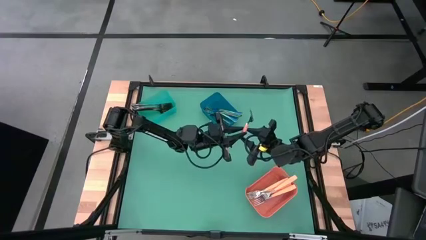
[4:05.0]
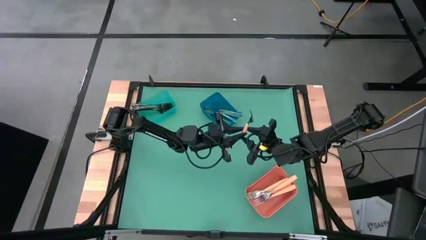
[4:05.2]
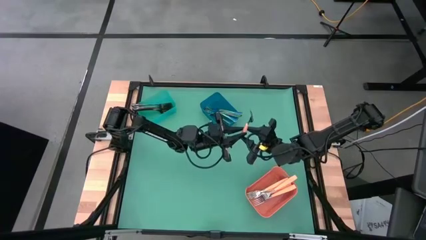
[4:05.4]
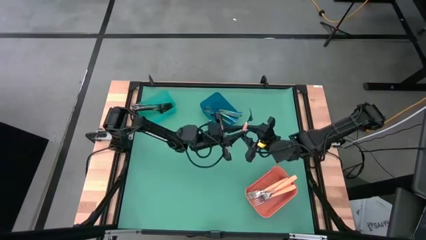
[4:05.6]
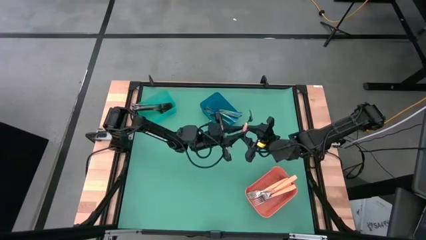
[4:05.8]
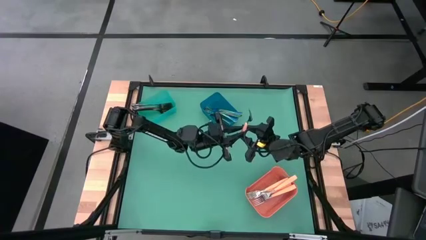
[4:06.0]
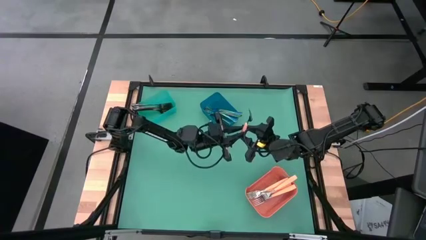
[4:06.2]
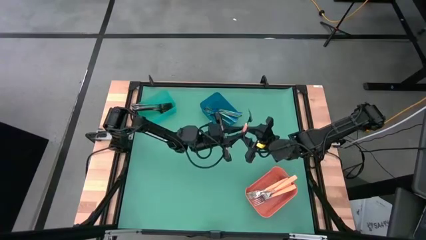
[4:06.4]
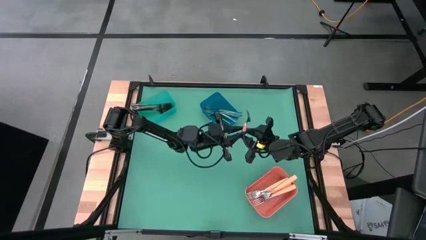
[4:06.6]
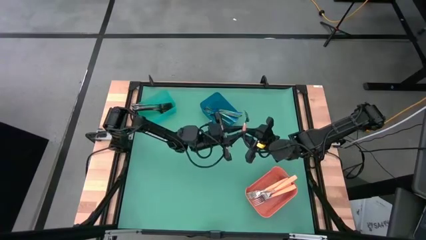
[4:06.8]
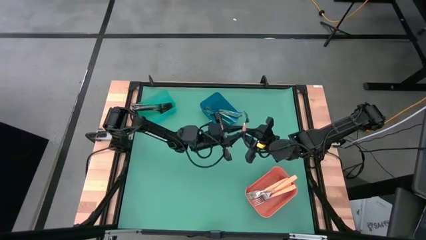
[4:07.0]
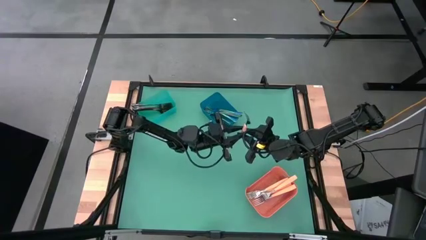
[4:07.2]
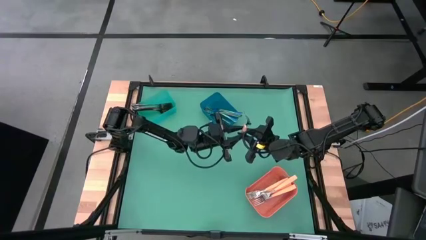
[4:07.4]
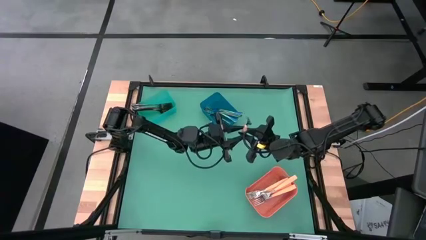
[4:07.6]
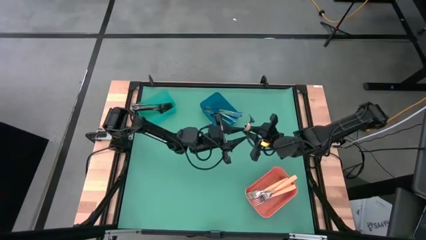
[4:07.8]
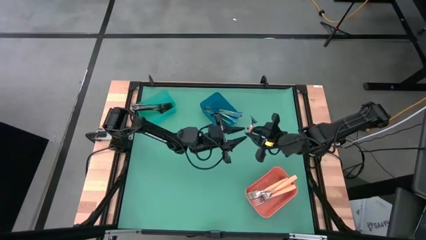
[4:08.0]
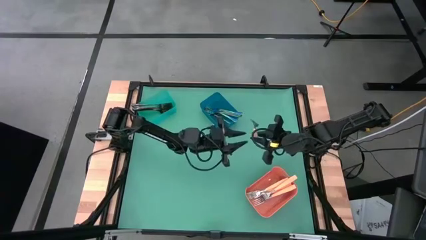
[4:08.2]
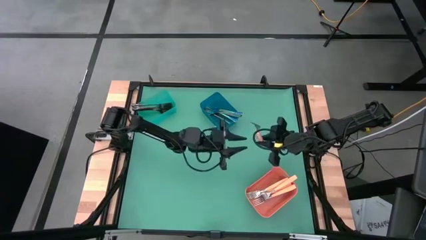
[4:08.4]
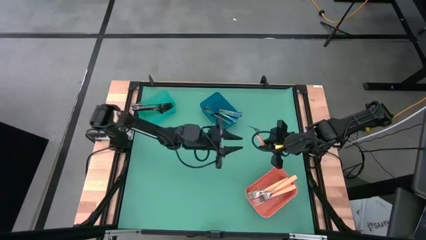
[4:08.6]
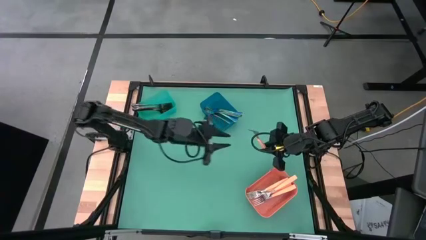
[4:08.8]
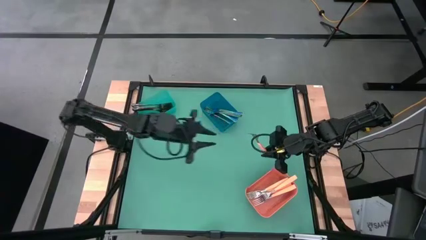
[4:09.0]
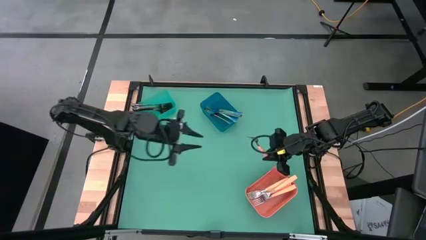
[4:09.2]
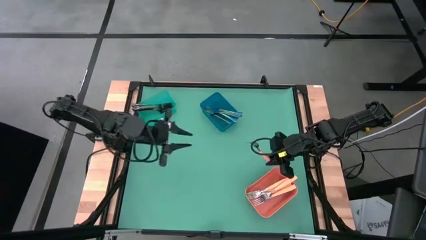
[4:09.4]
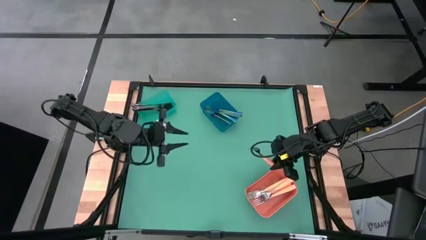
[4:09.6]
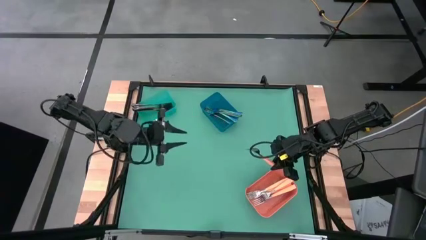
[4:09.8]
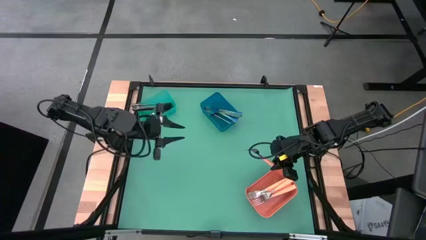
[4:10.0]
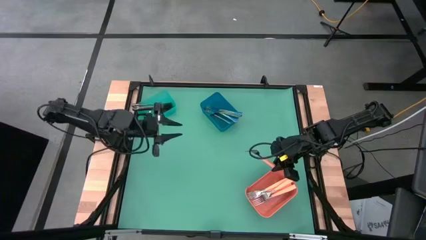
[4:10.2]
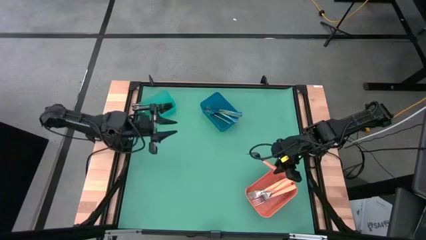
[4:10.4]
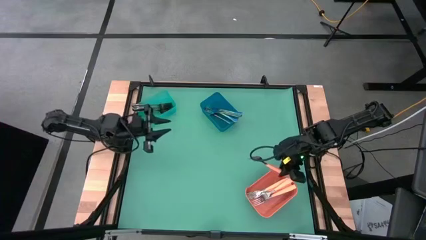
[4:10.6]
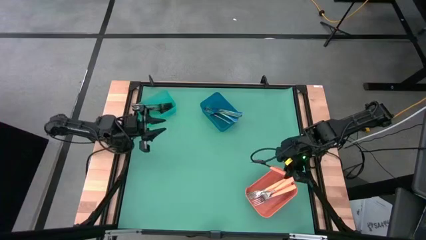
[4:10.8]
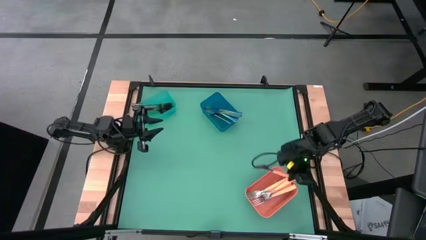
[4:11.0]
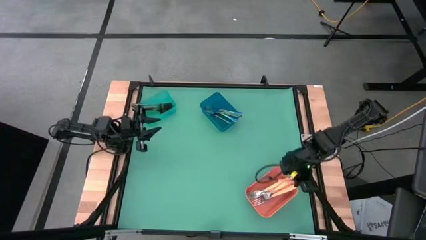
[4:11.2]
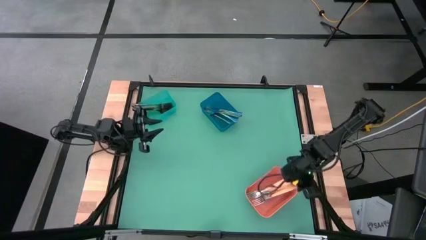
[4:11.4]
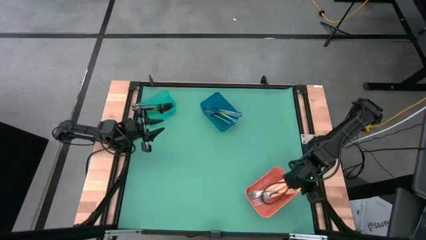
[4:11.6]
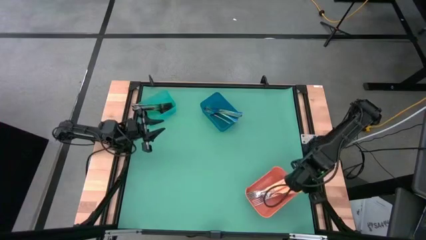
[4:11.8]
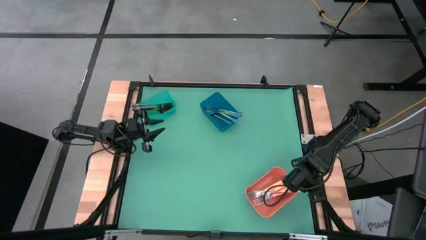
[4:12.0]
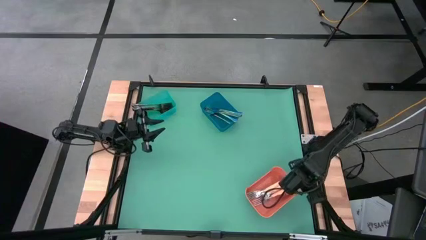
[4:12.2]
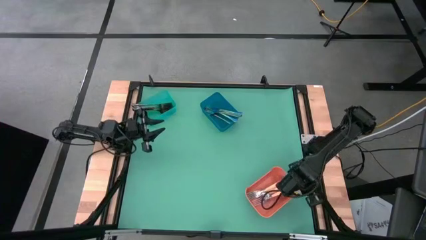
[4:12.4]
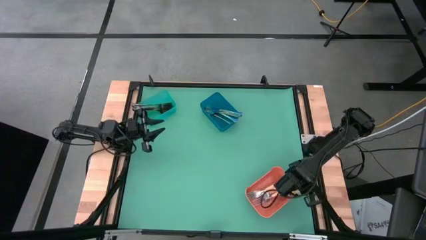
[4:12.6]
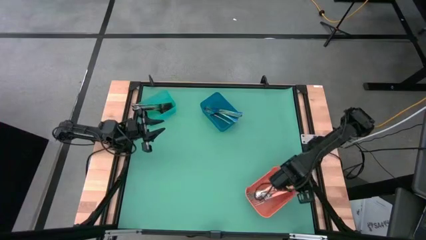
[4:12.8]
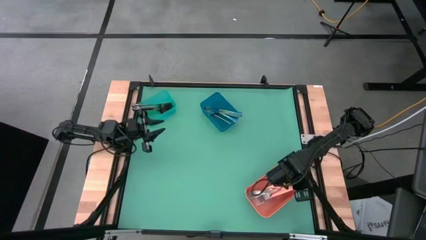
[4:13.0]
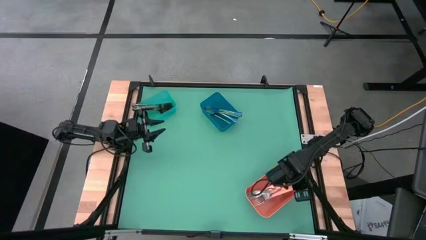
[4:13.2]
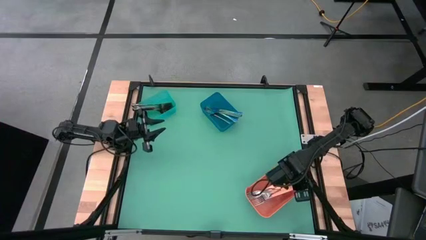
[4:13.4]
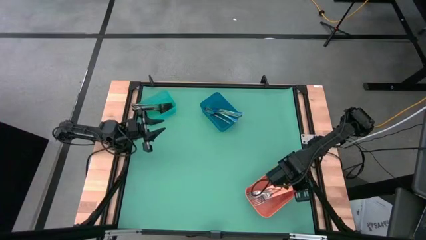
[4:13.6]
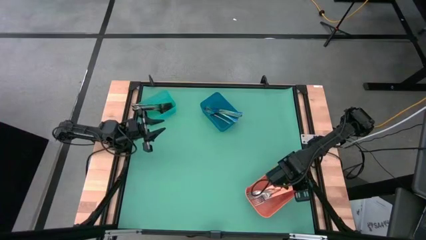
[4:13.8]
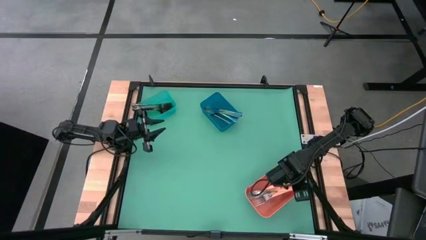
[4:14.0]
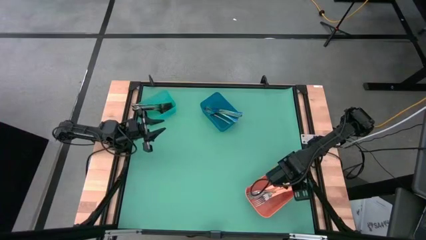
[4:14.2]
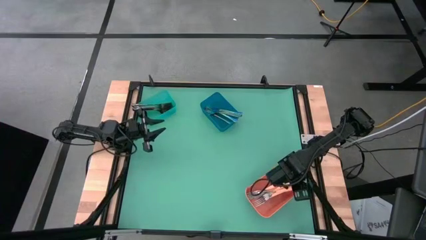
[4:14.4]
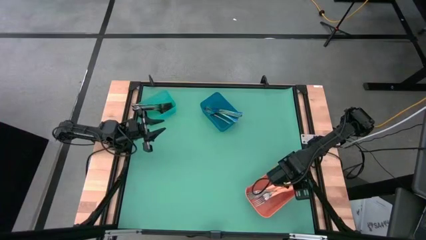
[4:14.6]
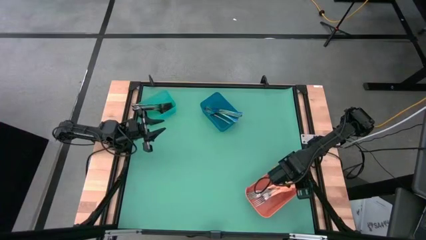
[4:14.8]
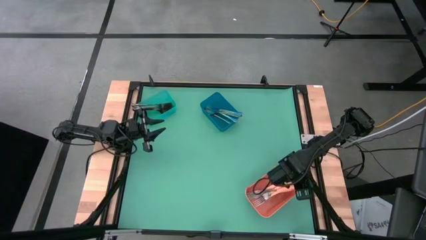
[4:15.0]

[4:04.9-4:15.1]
Task: Sort silverware by color (type)
Put the orange fork into the orange bin

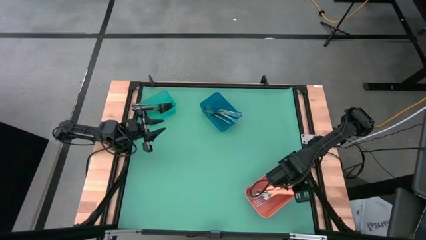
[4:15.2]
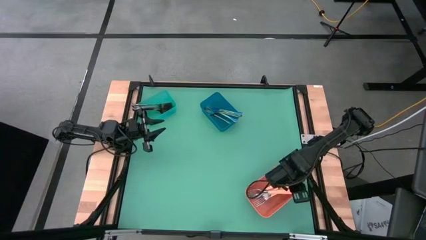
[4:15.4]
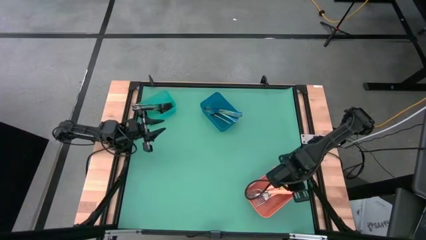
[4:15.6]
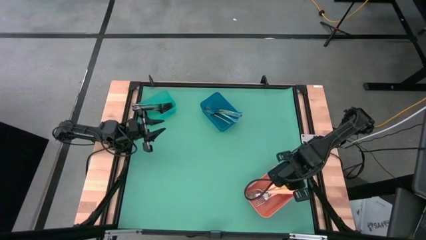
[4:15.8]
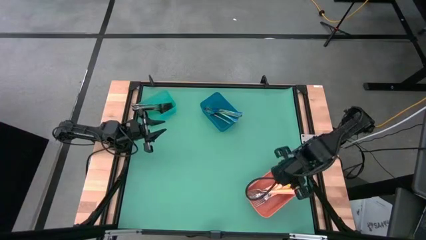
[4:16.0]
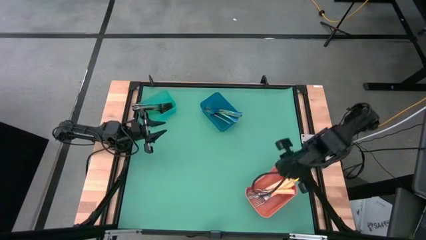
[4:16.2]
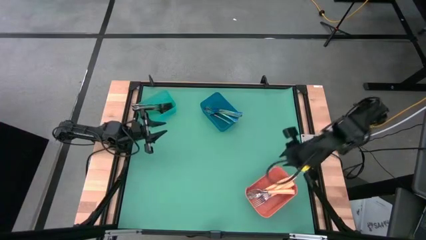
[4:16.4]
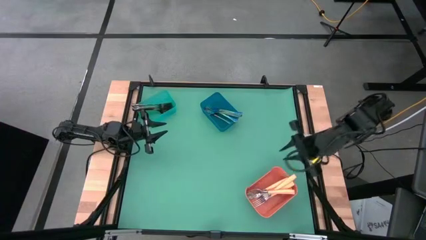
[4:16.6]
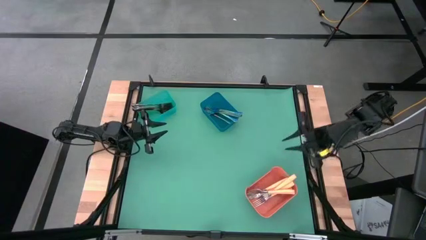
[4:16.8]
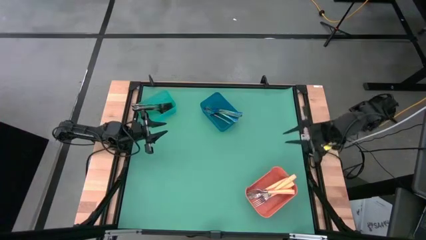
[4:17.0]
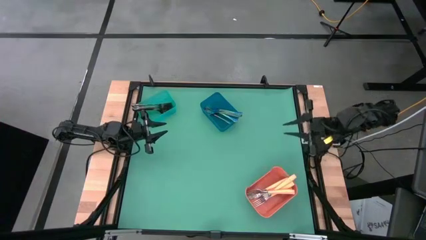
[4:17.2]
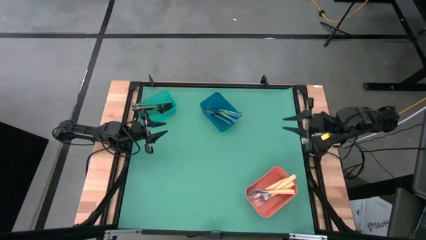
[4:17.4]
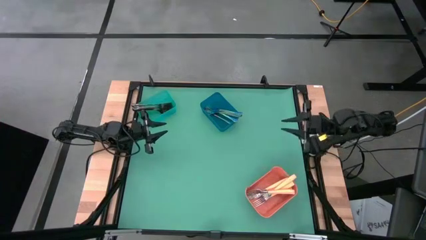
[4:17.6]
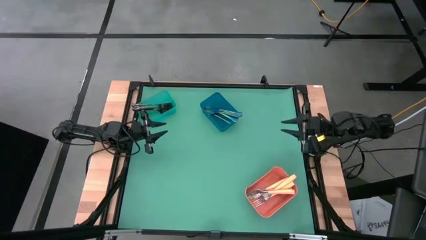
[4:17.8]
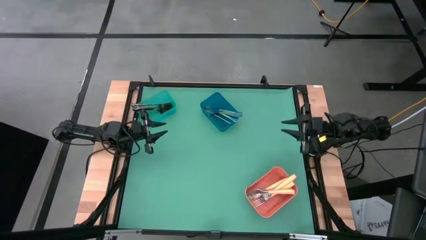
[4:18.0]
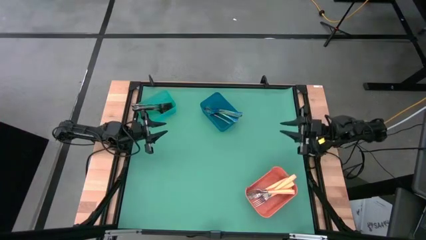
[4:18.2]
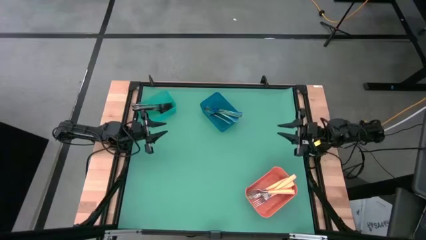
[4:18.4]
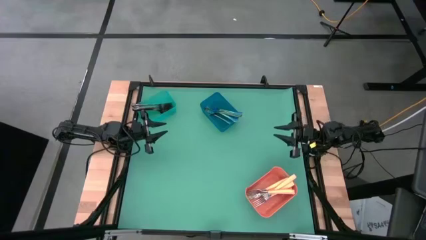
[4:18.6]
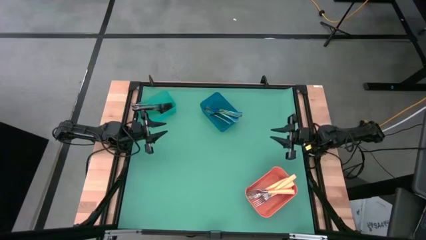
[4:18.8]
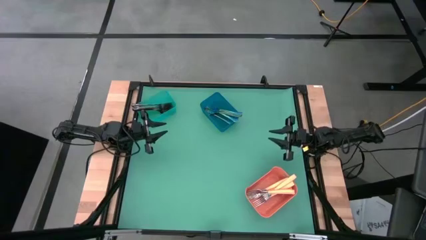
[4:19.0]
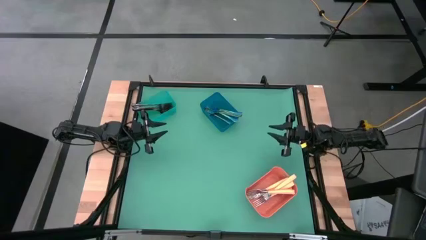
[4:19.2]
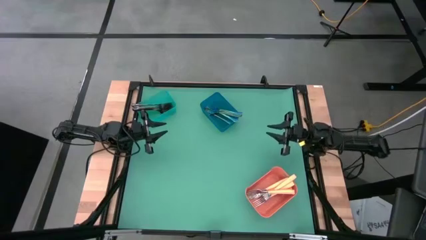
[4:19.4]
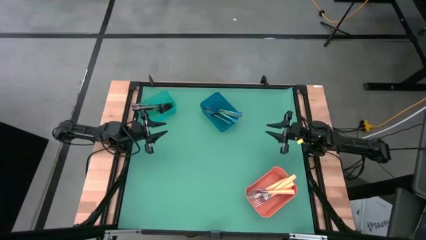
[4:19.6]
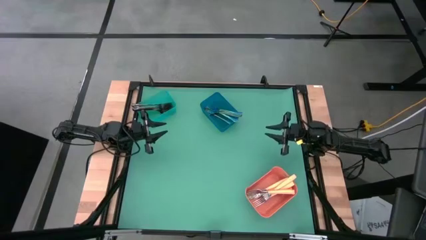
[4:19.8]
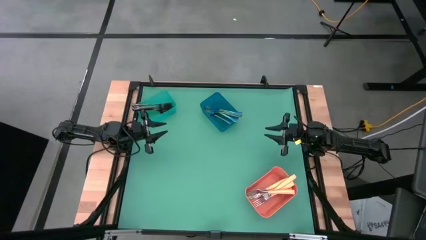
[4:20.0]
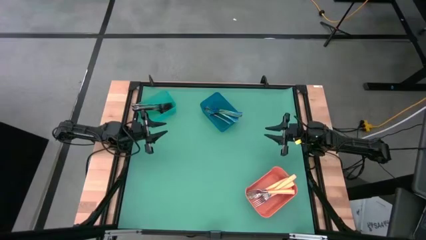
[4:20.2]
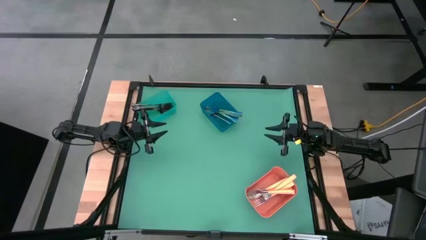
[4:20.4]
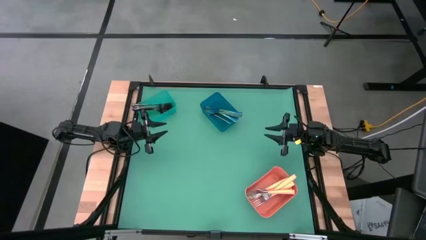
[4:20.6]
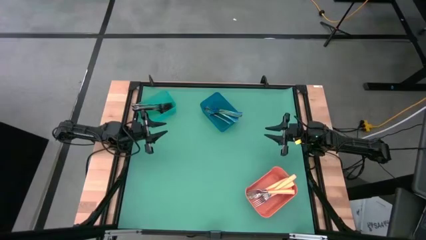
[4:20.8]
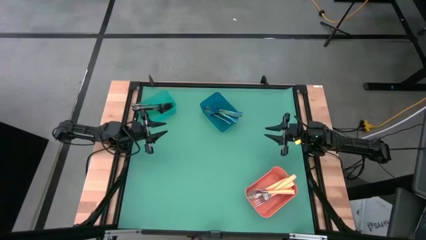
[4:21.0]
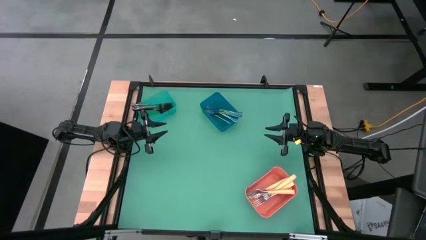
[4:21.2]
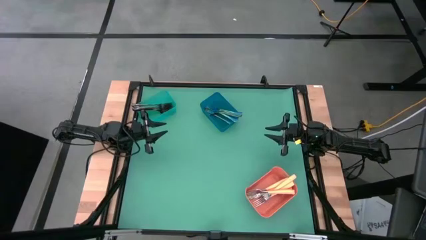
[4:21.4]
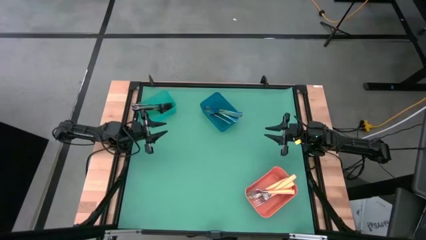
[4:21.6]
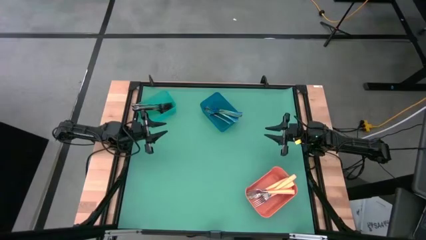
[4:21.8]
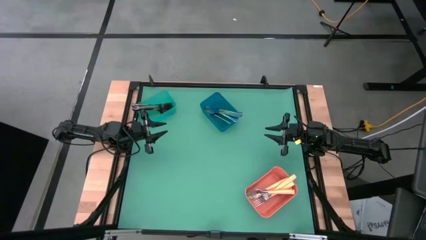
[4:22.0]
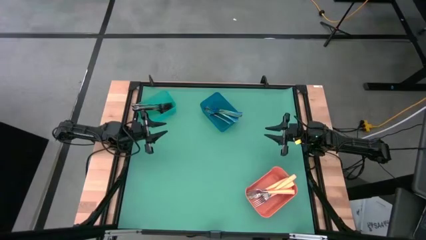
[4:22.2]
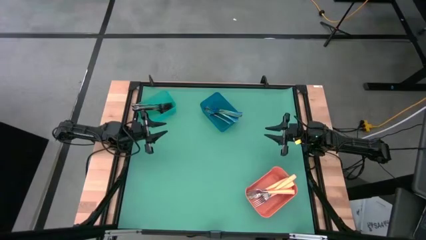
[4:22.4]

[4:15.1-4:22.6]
Return to Home Position
